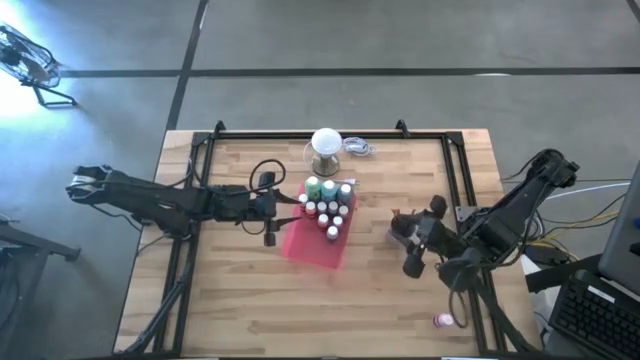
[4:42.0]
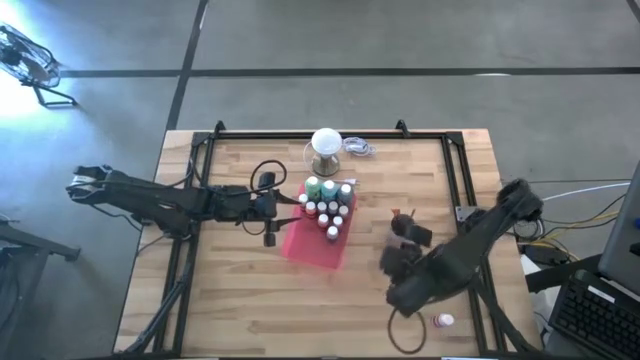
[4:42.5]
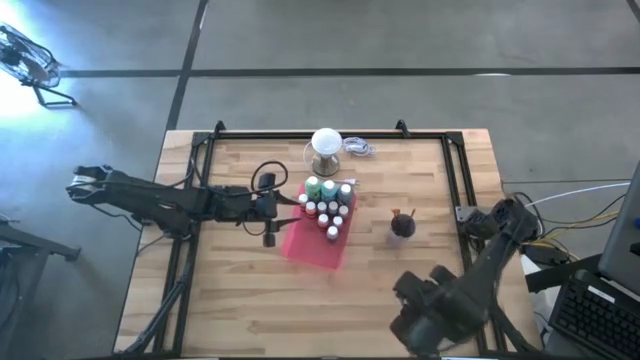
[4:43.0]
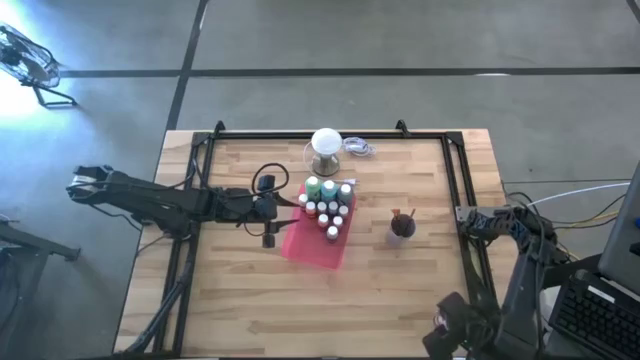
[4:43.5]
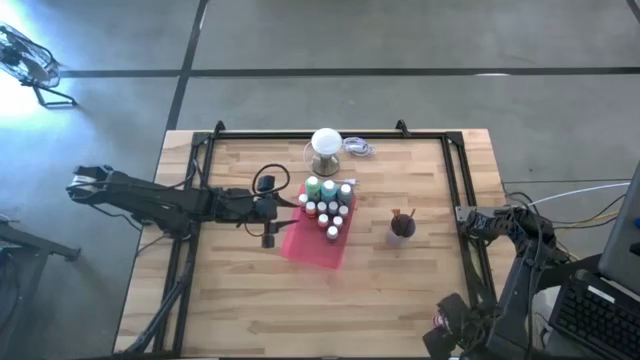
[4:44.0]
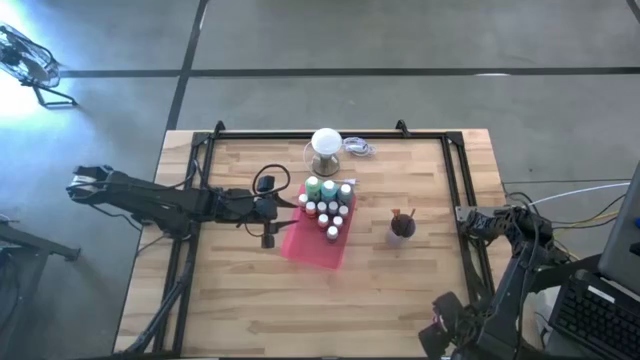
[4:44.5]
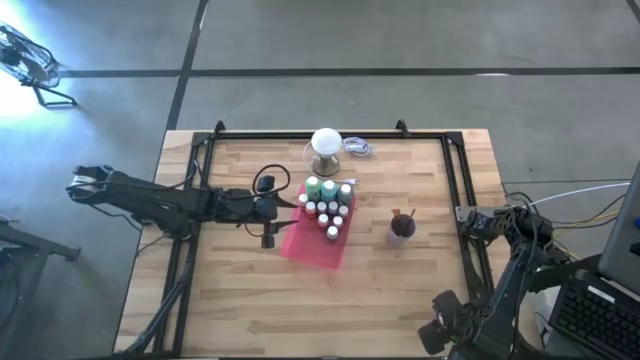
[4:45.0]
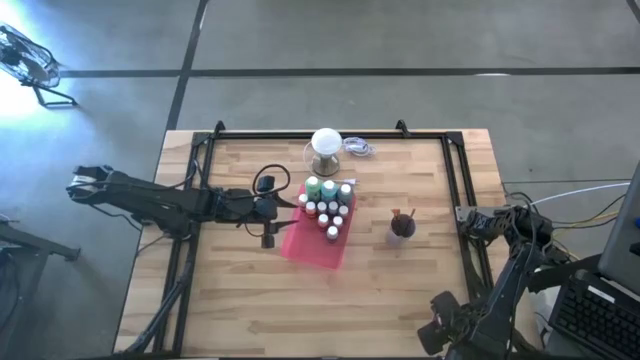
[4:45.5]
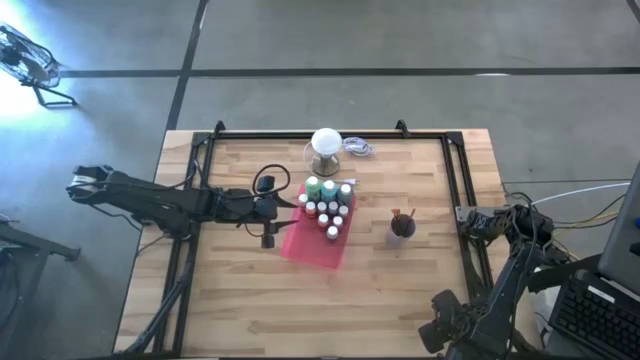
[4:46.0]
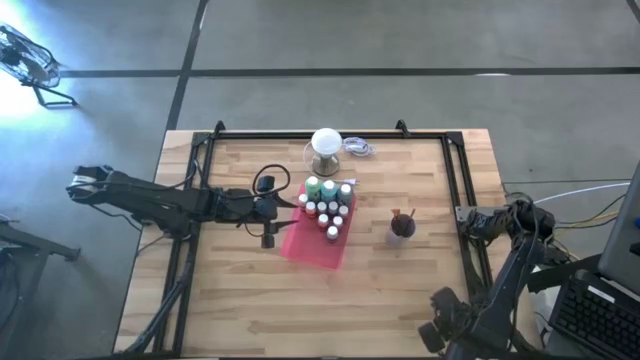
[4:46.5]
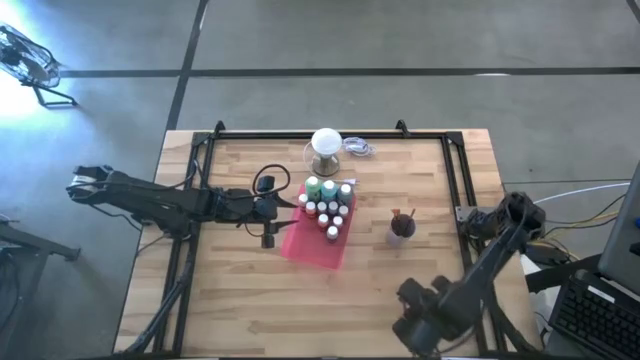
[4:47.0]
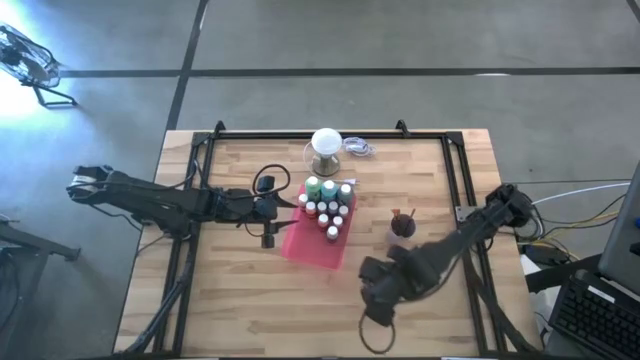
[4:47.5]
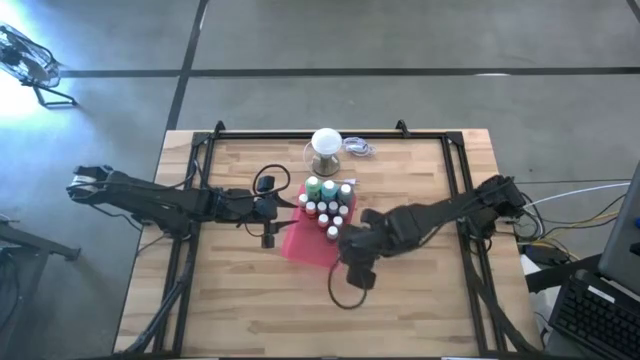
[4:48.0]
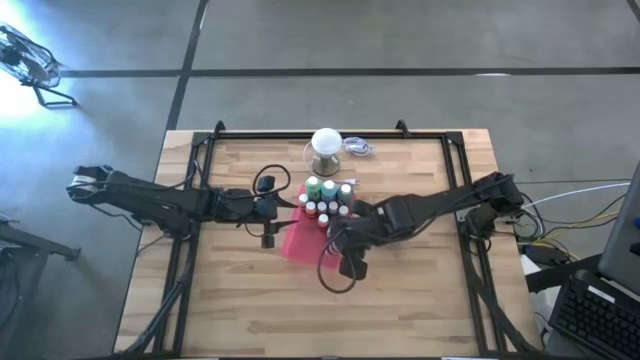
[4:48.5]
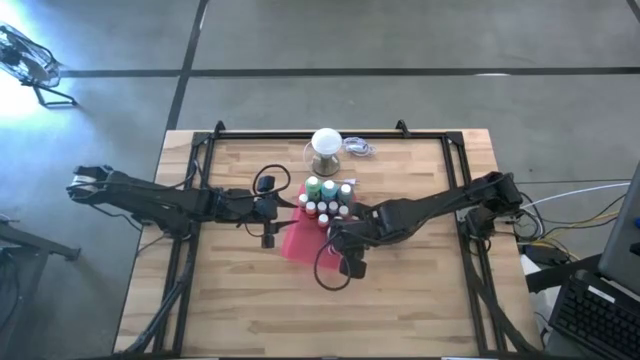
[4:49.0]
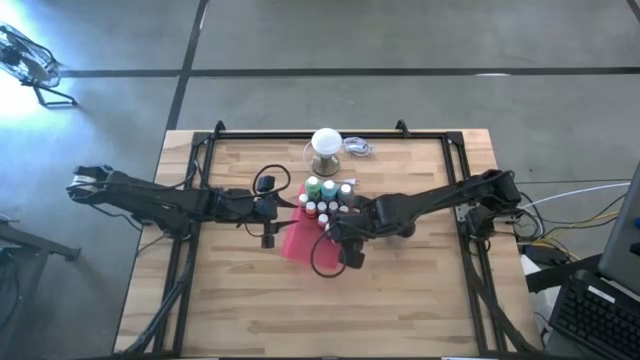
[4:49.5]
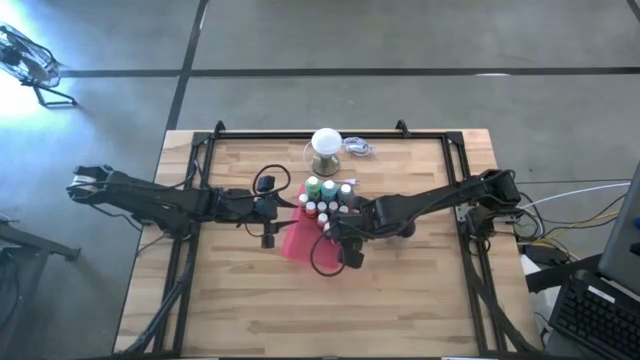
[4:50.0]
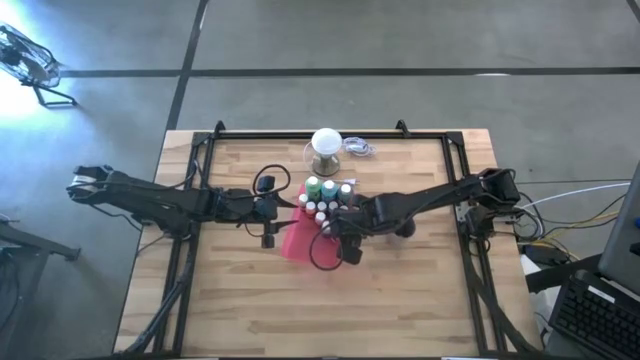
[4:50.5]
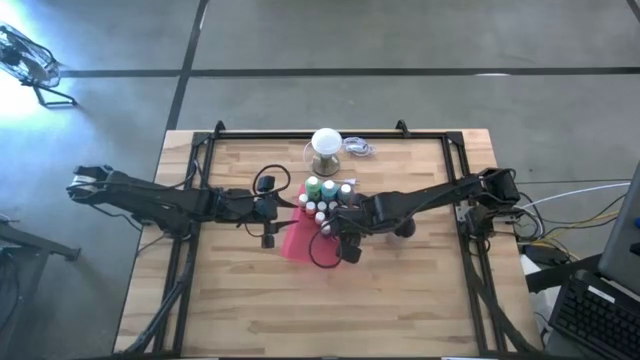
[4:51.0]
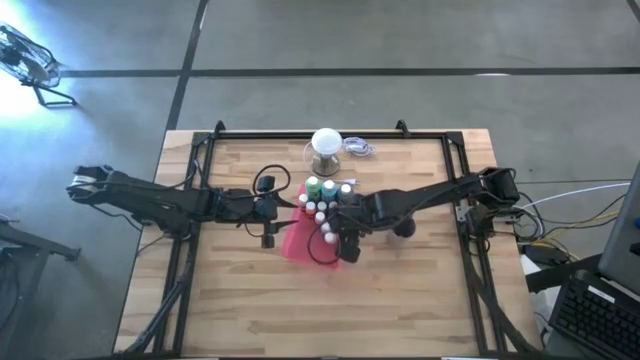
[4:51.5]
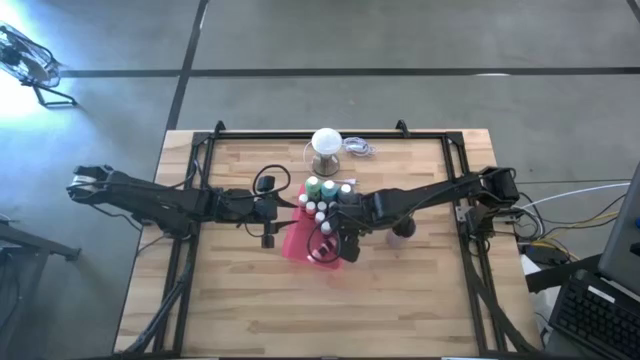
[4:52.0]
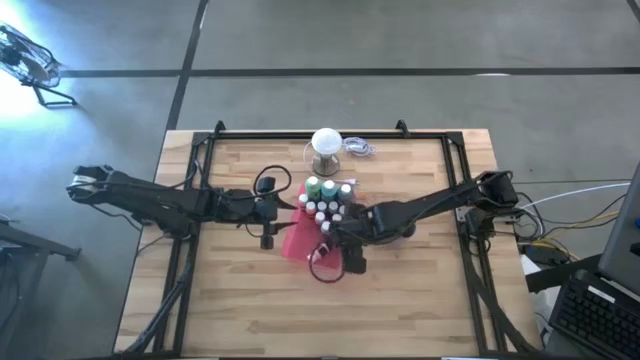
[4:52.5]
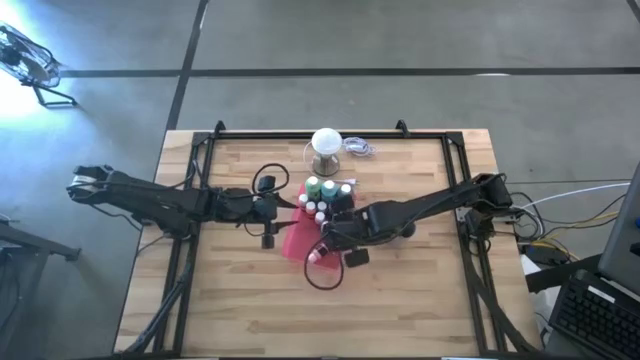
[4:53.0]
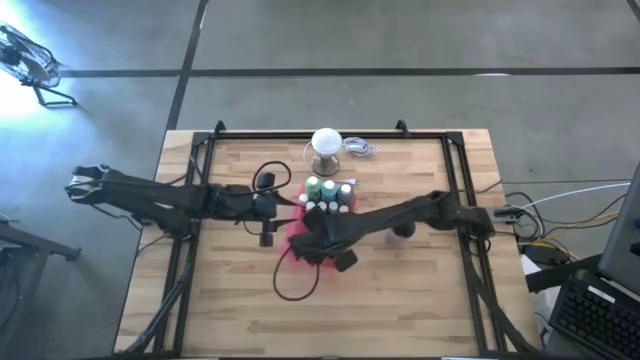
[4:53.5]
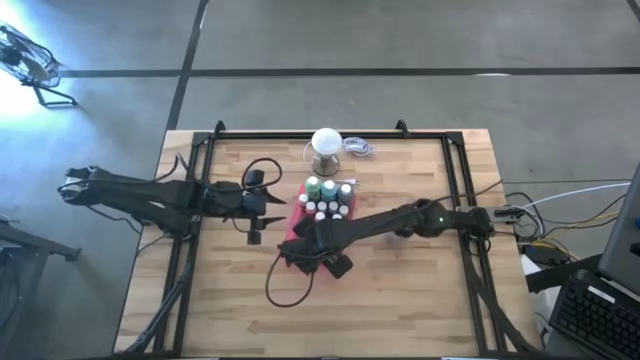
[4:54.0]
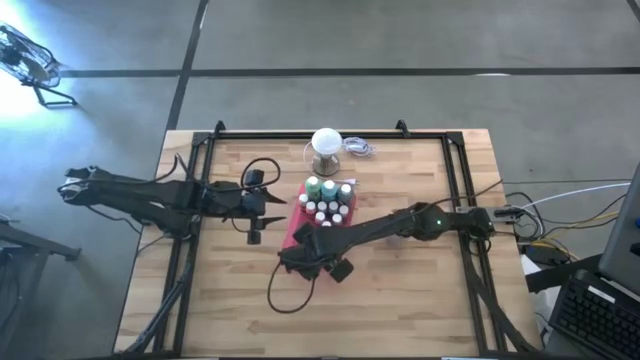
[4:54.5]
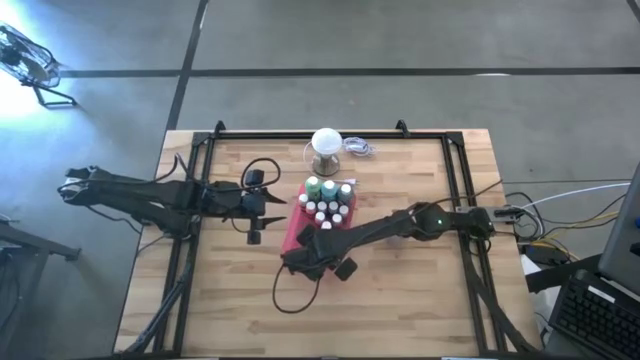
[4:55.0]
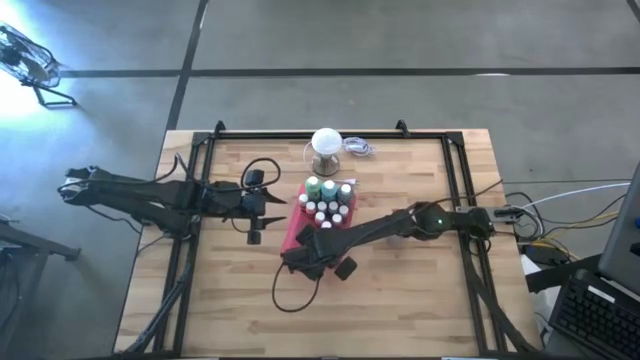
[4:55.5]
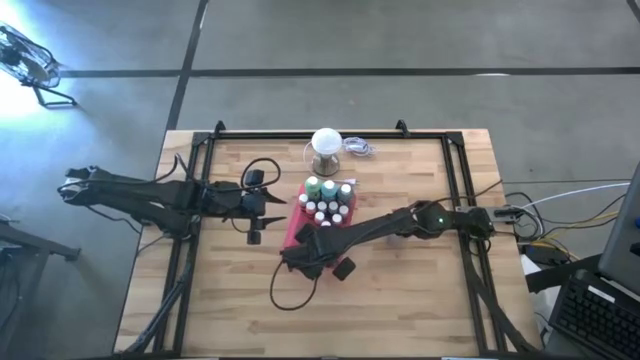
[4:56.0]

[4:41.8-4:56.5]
Task: Pick & Place Paint Supplies
Put the small pink paint bottle into the red bin

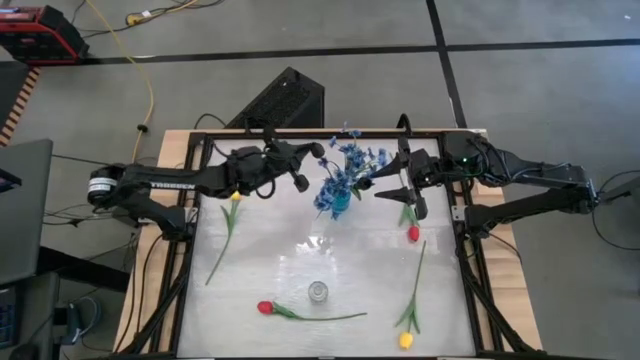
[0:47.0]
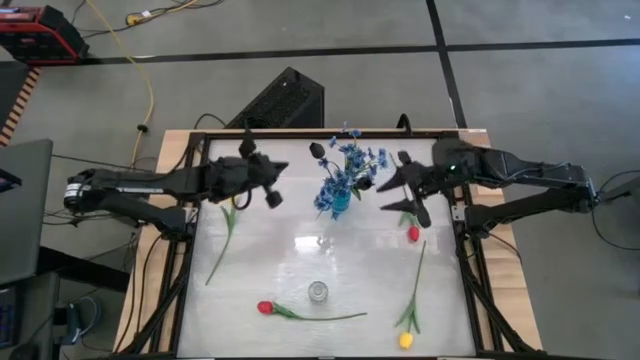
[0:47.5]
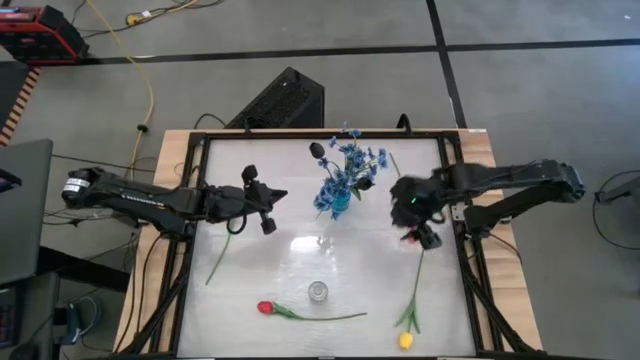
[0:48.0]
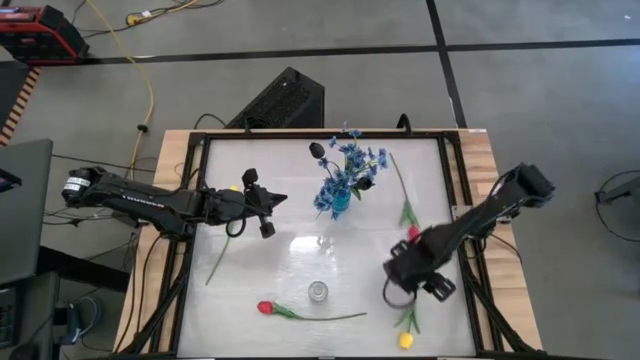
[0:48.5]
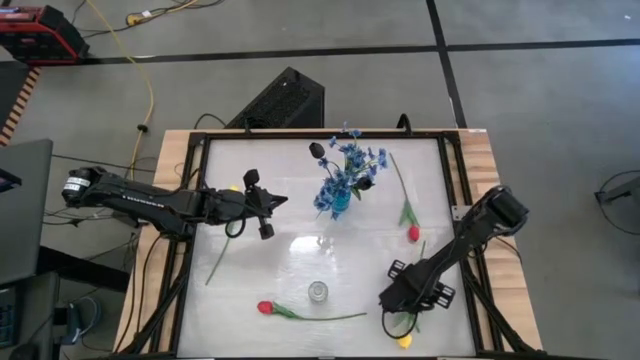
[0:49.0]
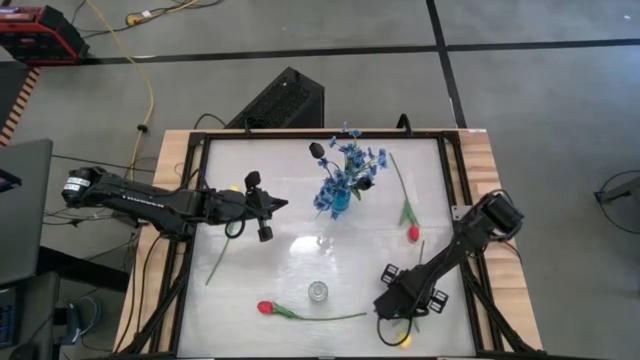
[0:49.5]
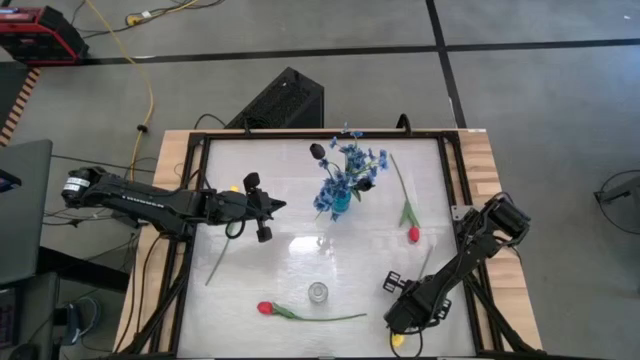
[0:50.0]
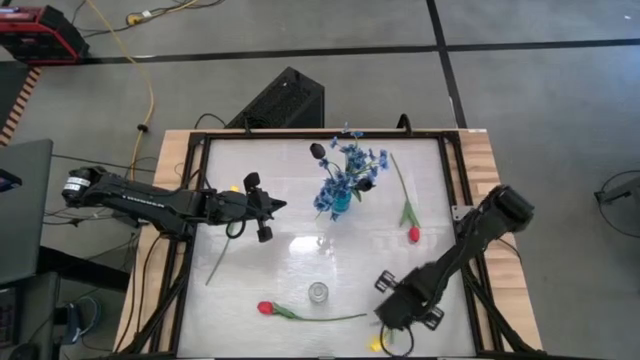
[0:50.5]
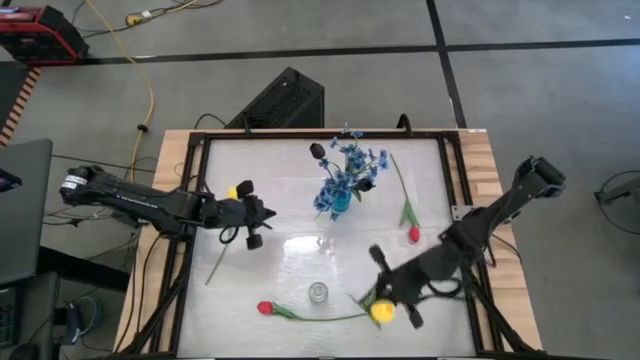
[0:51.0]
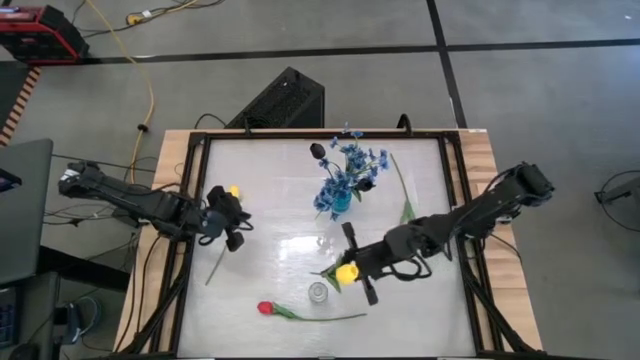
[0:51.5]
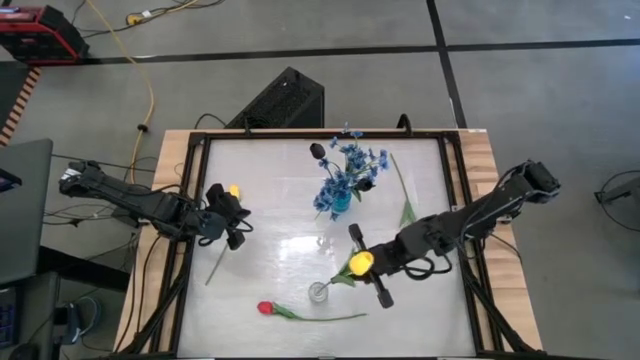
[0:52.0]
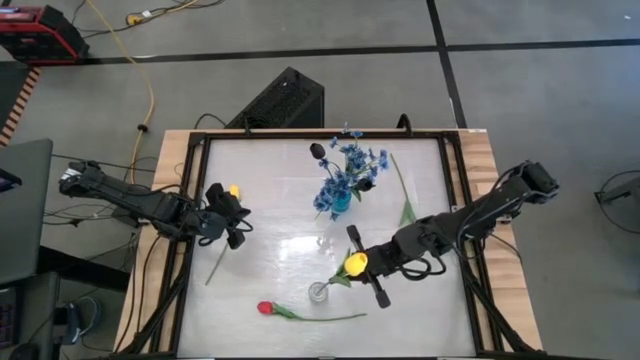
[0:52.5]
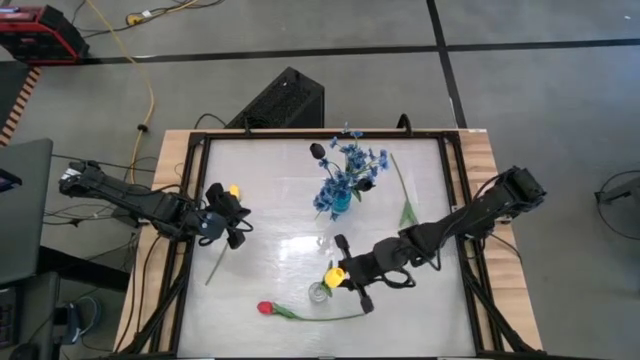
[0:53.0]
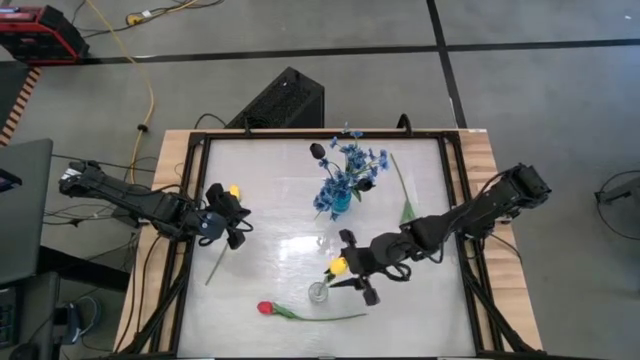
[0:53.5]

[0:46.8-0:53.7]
Task: Sort flowers into vase by color
Put the bottom right yellow flower into the transparent vase
